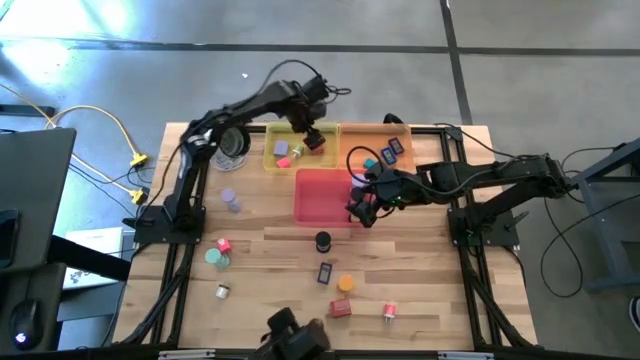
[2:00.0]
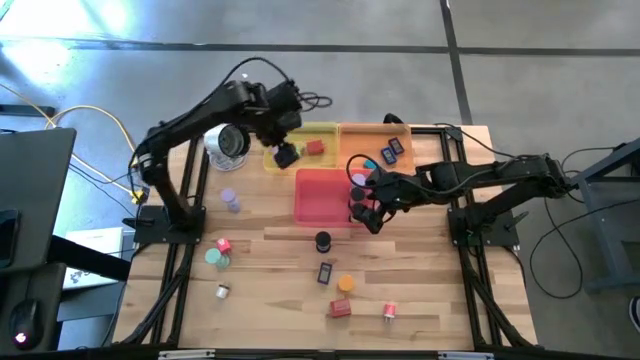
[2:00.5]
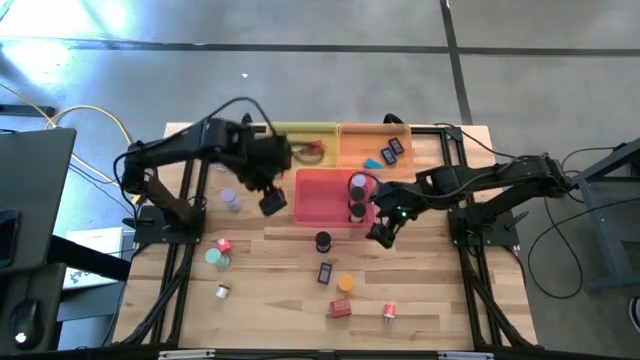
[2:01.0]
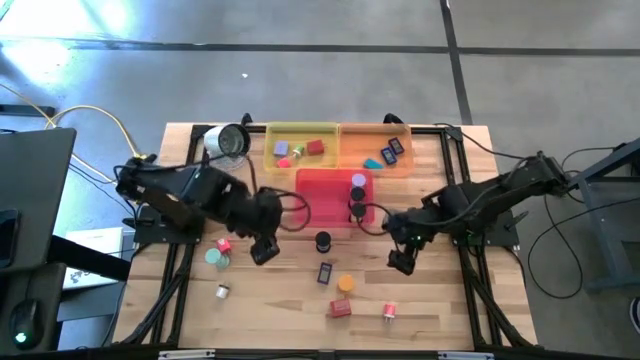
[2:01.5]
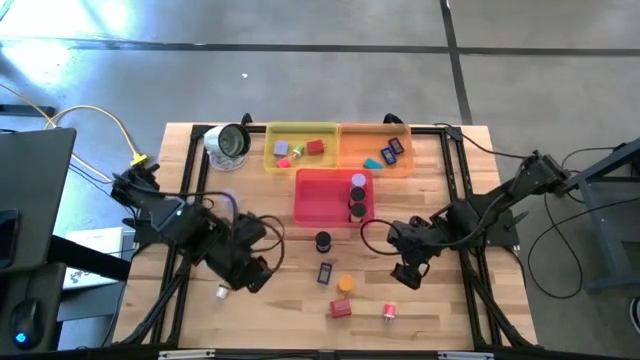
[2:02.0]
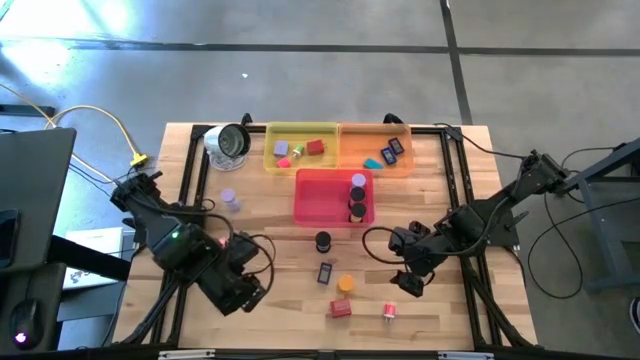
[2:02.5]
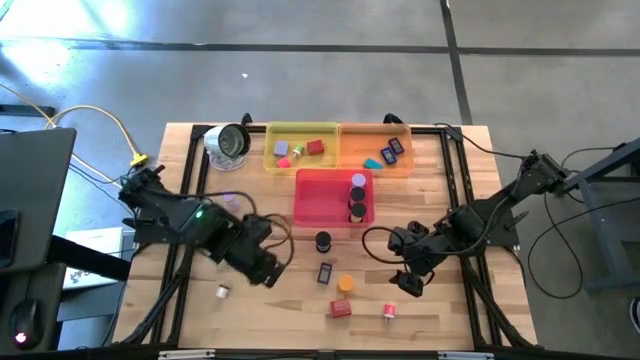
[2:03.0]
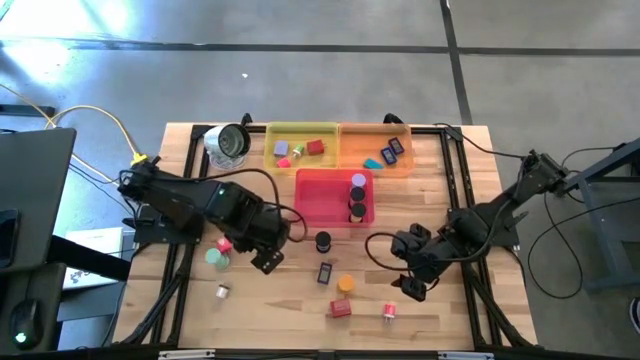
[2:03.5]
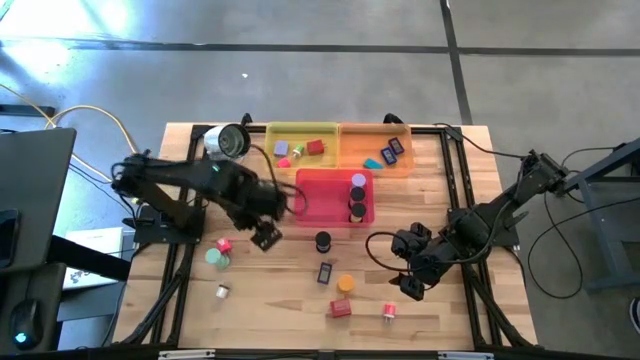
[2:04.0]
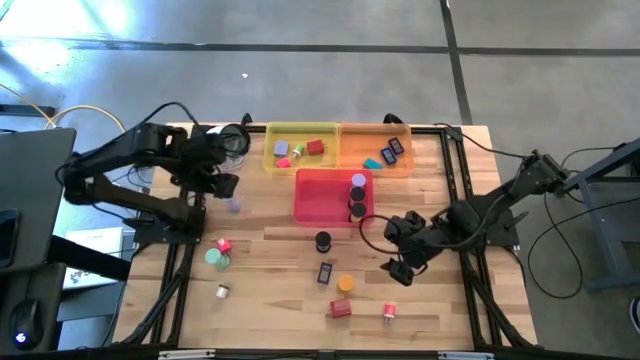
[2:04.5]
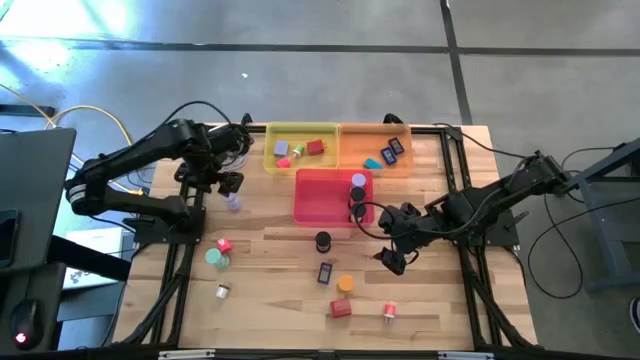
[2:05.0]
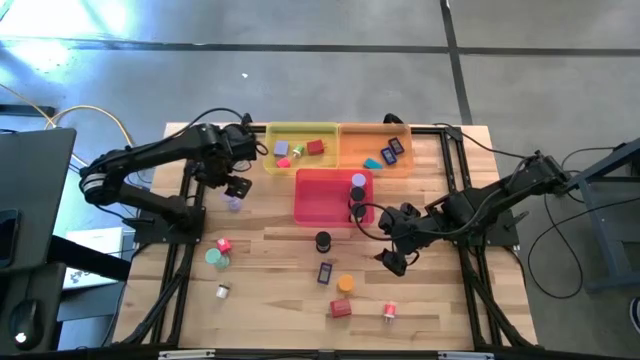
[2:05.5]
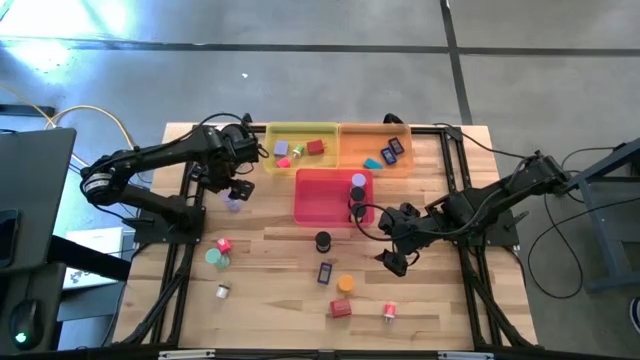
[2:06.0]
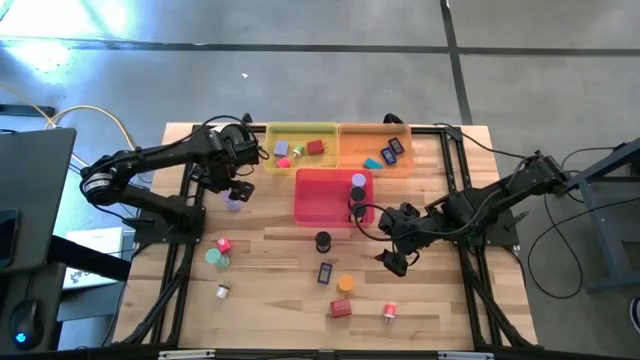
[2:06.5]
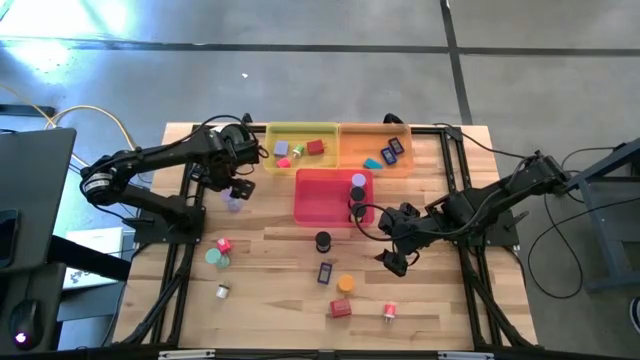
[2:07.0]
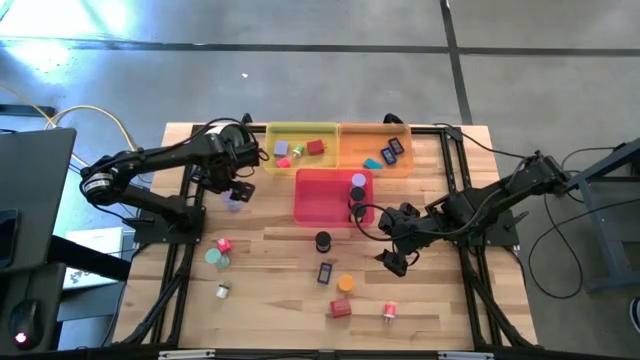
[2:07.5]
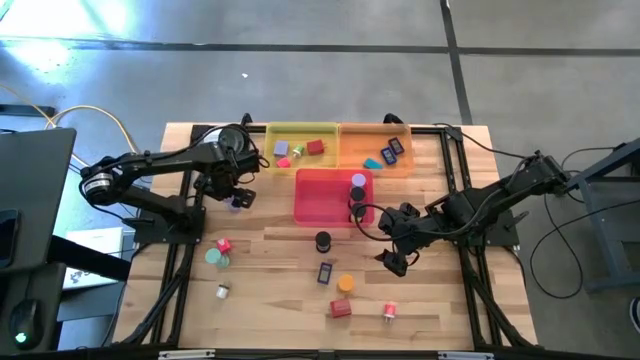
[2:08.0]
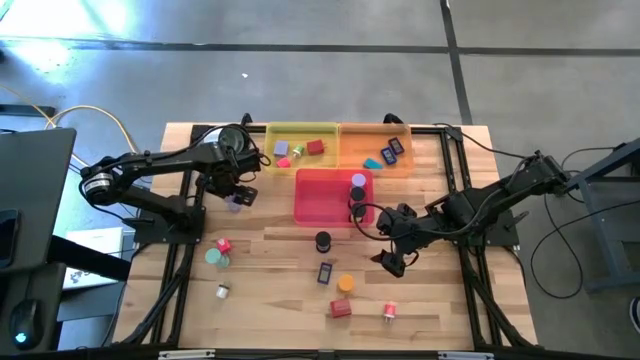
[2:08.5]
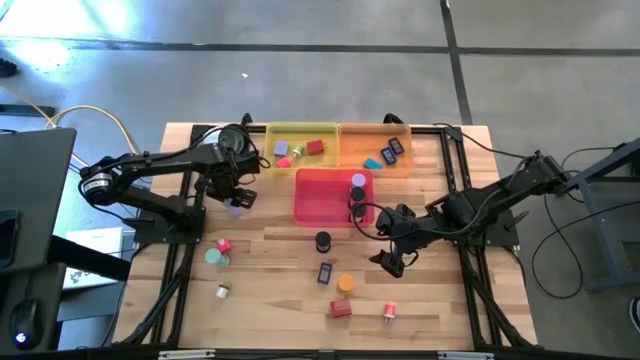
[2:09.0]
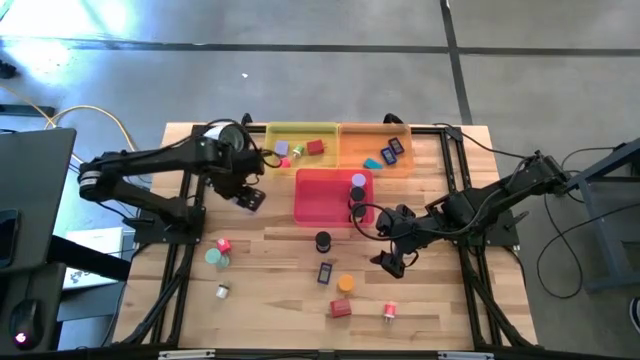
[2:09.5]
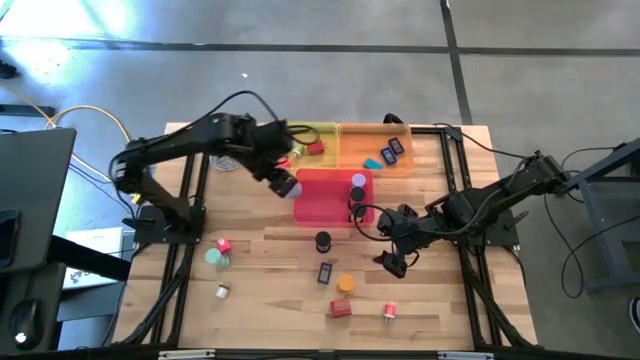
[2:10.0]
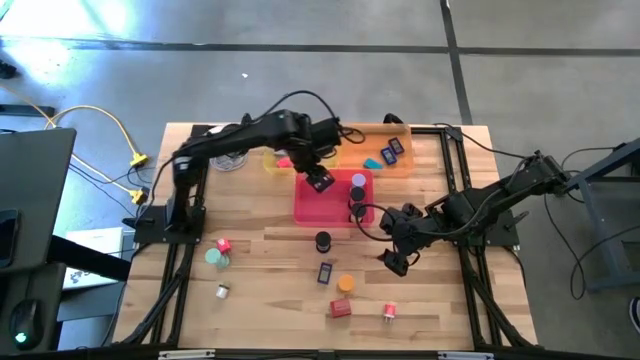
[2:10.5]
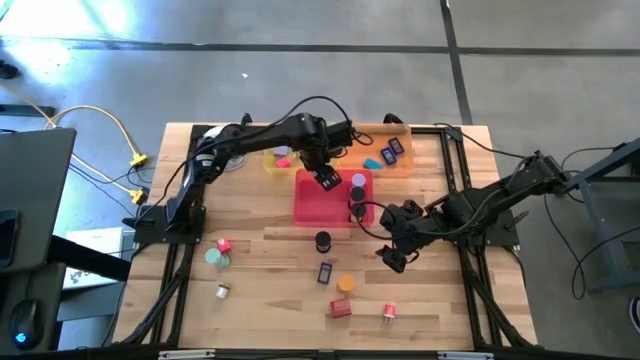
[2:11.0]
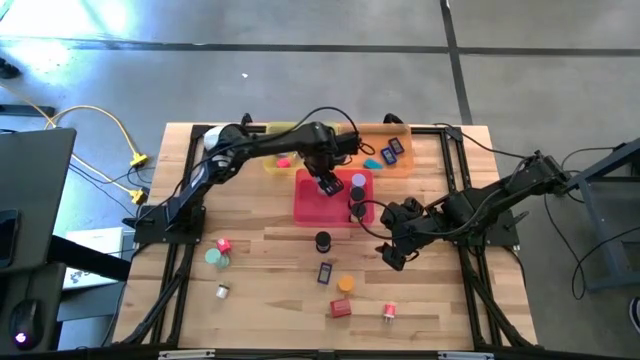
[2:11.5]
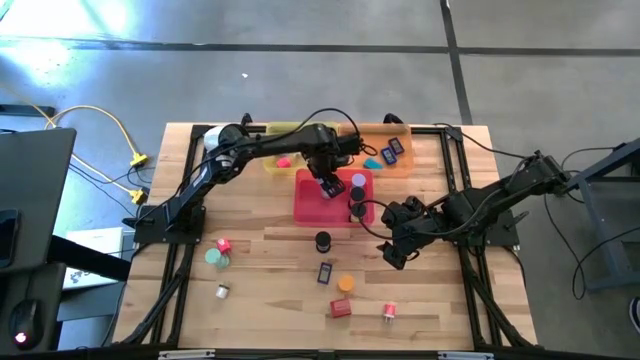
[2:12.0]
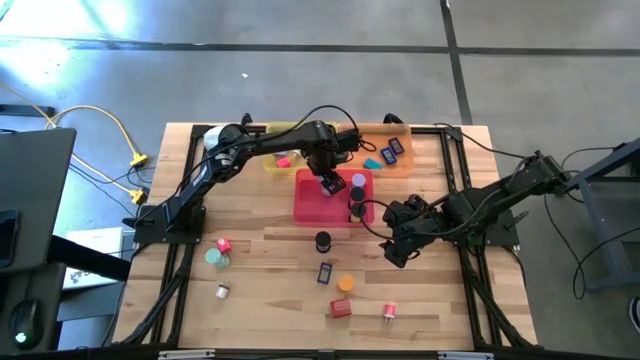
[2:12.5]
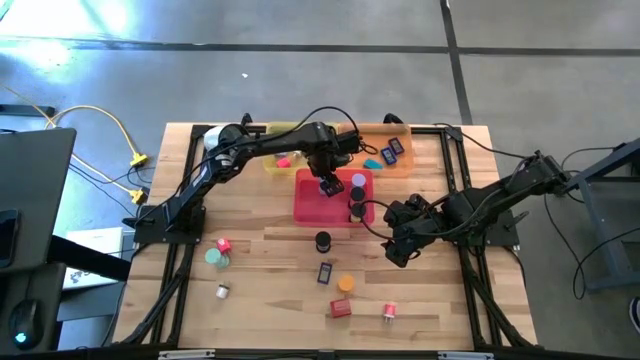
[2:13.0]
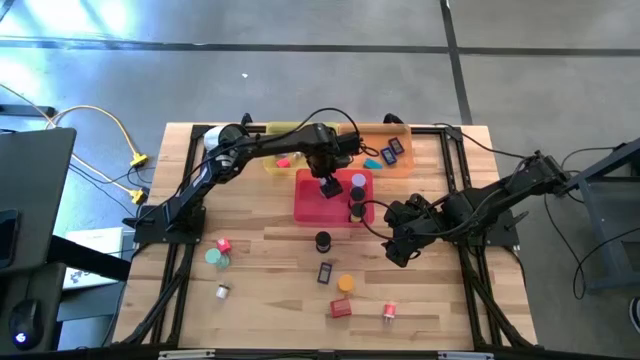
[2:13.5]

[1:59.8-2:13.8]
Task: Pick & Place Office items
Put the violet hourglass into the red bin

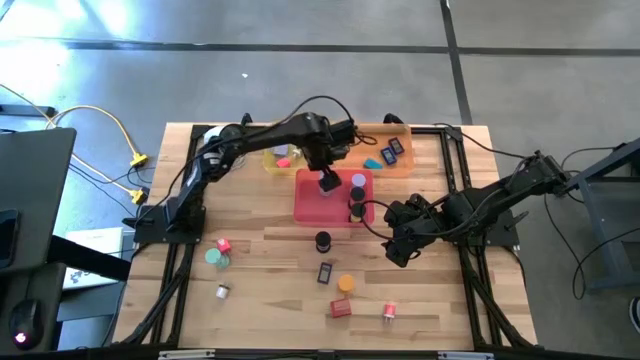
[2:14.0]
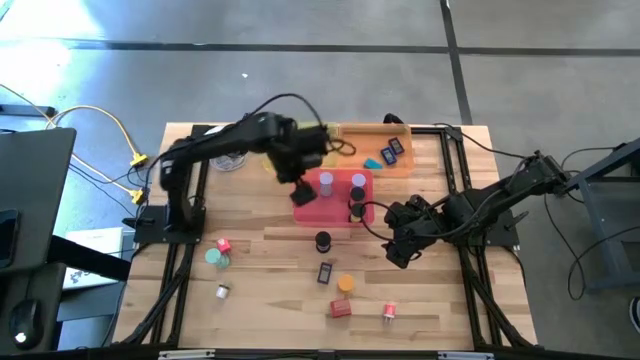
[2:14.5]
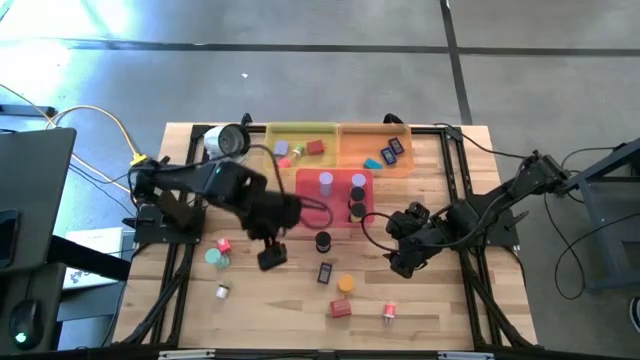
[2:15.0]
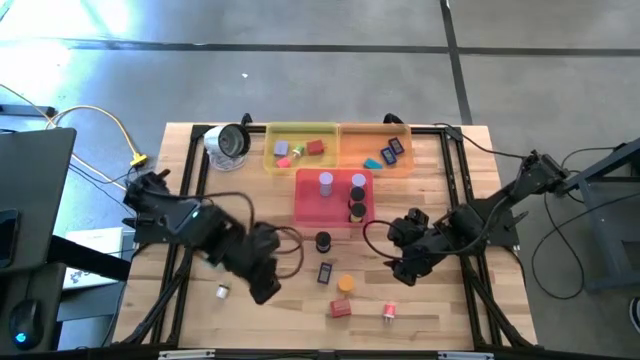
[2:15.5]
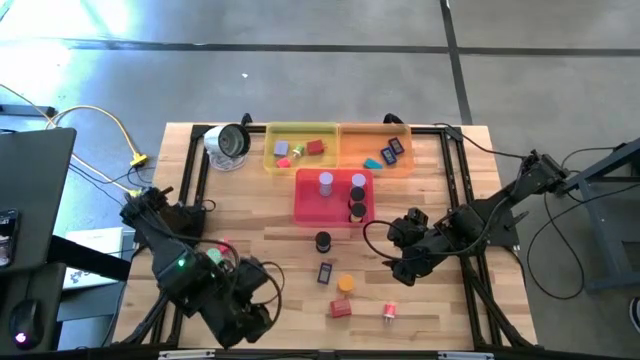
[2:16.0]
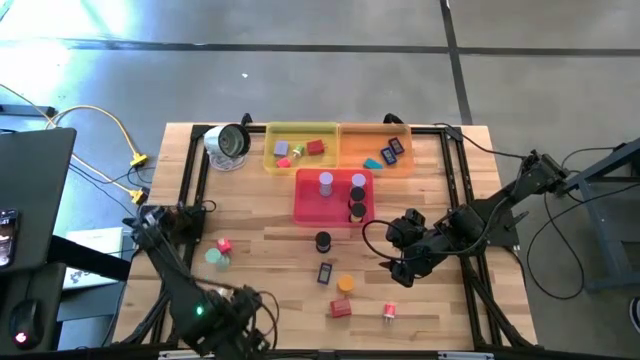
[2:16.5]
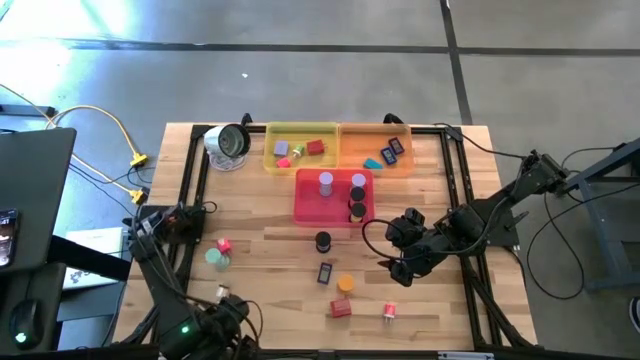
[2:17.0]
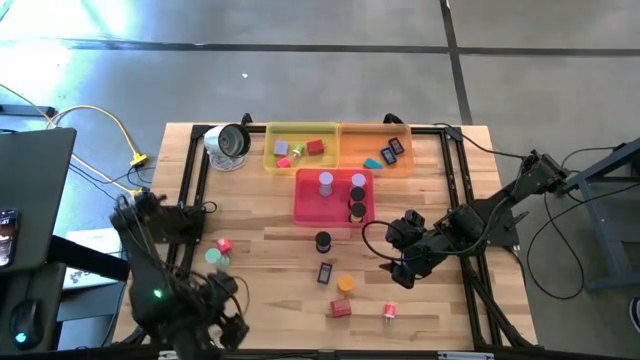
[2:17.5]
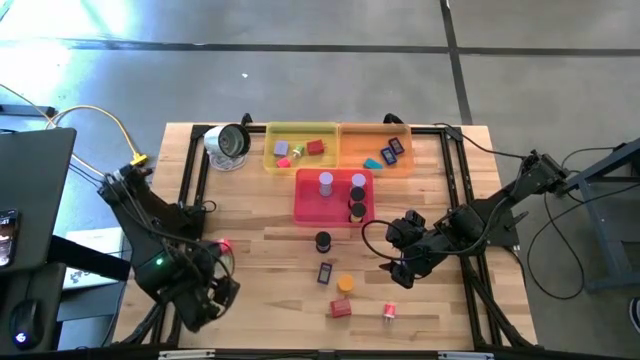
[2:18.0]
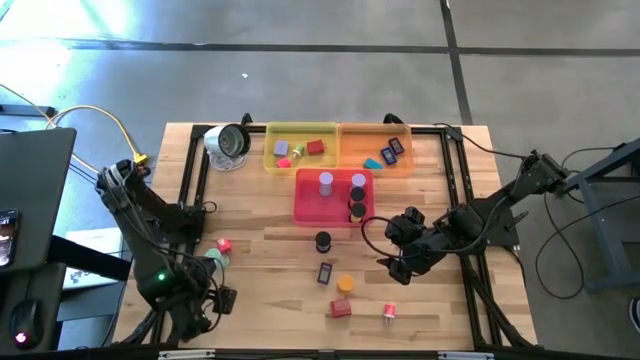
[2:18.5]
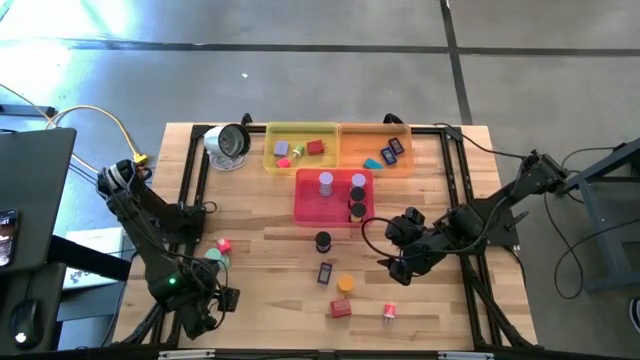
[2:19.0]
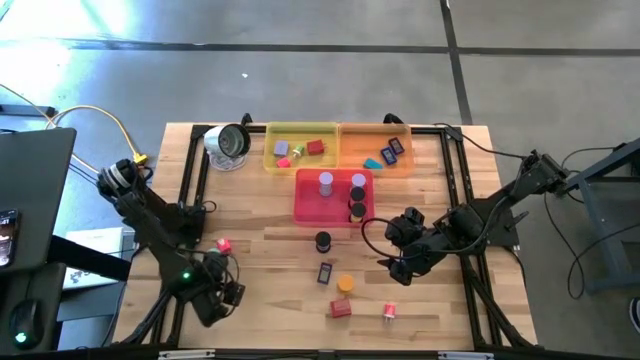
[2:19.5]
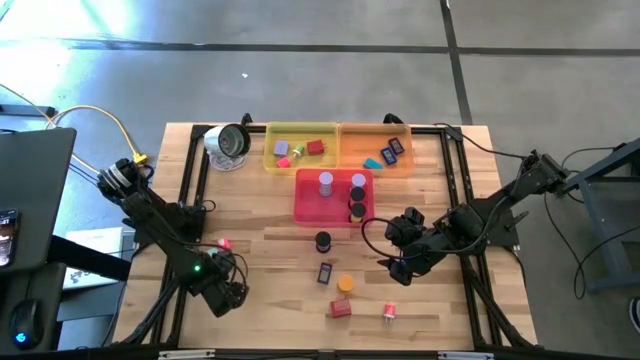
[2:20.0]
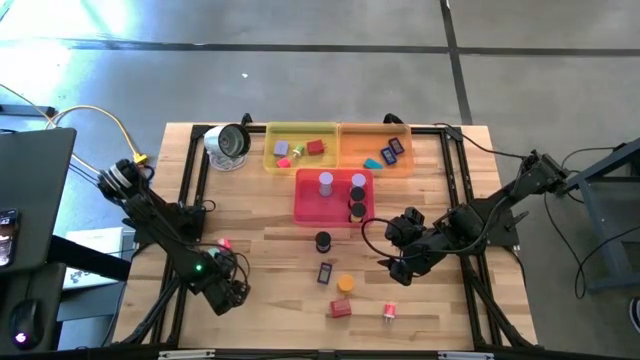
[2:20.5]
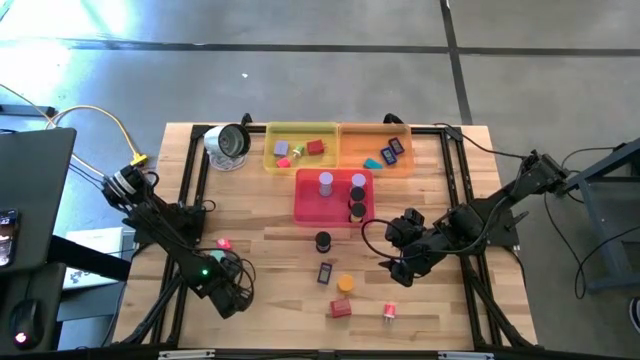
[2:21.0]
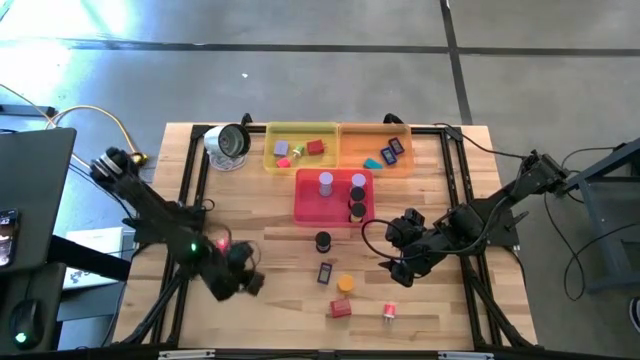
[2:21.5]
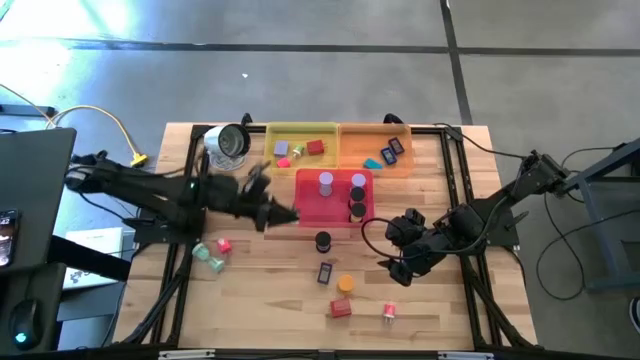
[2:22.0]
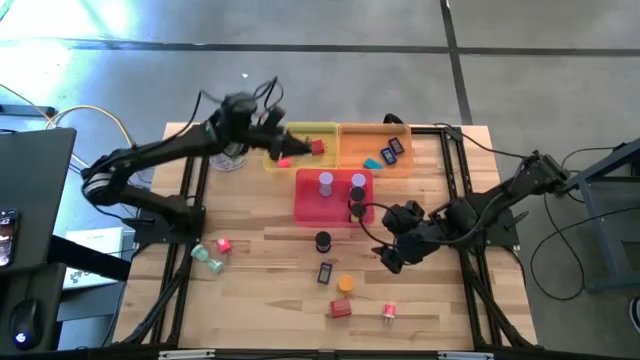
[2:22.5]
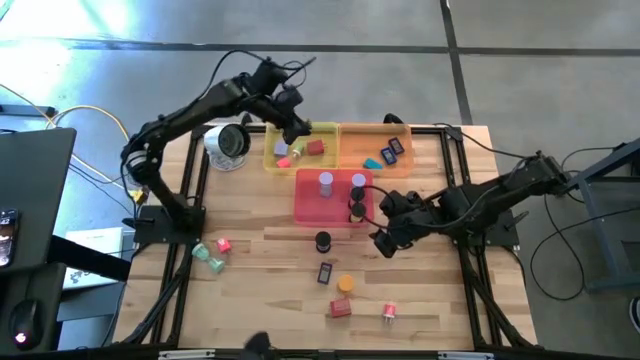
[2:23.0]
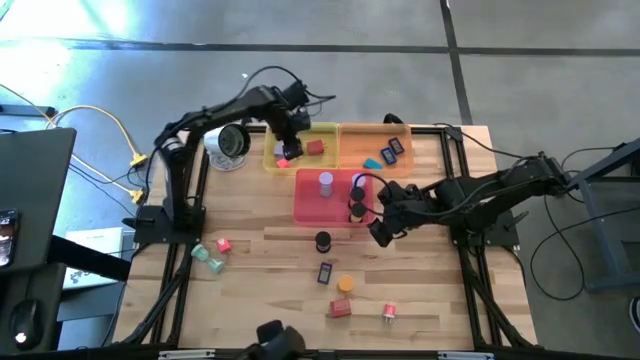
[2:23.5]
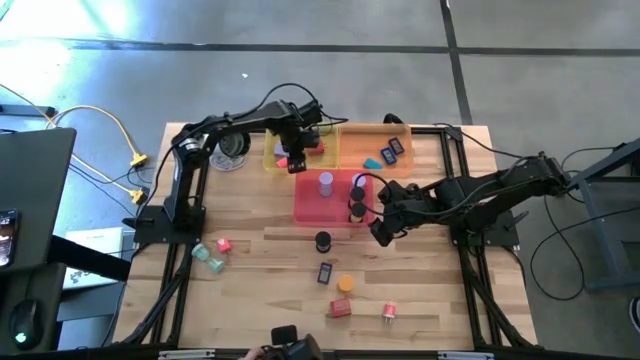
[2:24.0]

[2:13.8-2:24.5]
Put the white charger adapter into the yellow bin
